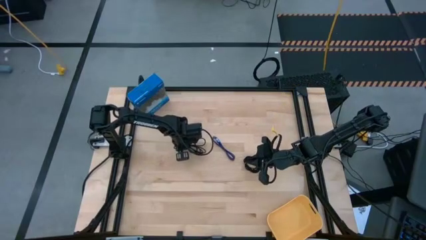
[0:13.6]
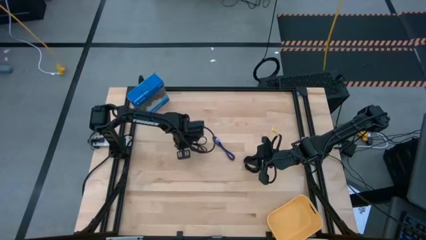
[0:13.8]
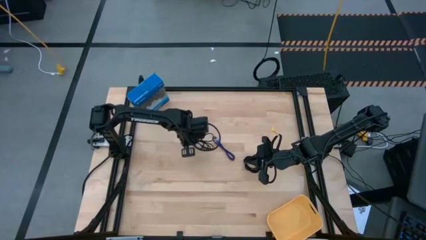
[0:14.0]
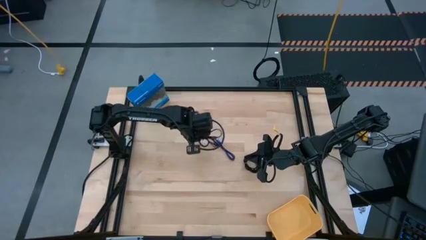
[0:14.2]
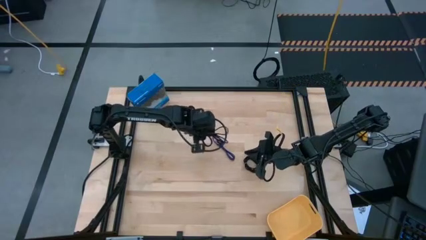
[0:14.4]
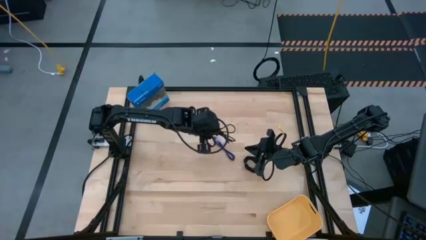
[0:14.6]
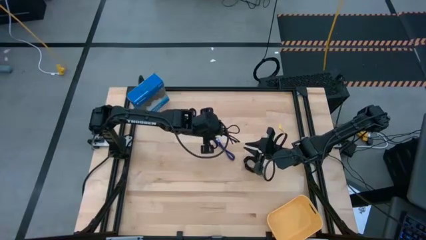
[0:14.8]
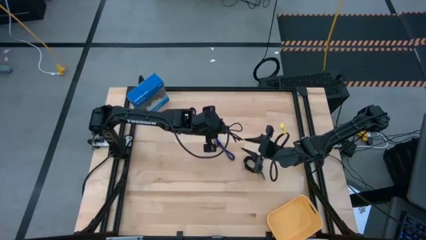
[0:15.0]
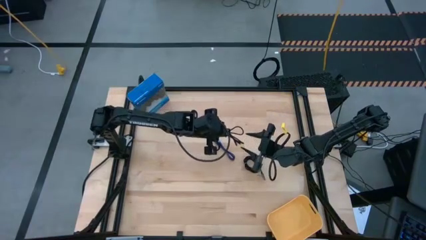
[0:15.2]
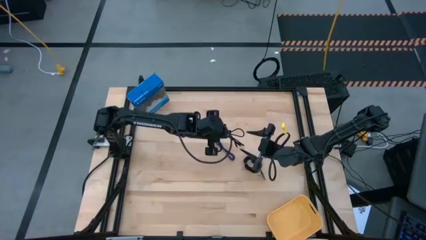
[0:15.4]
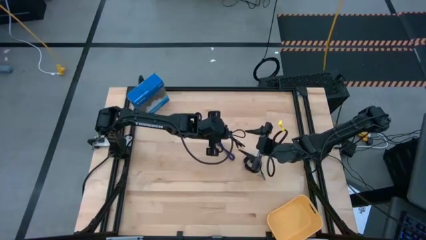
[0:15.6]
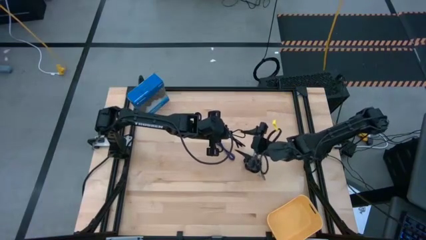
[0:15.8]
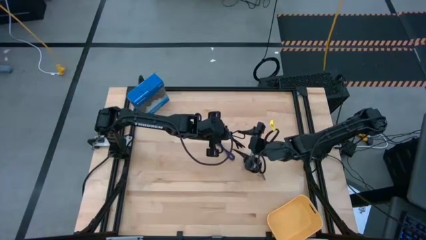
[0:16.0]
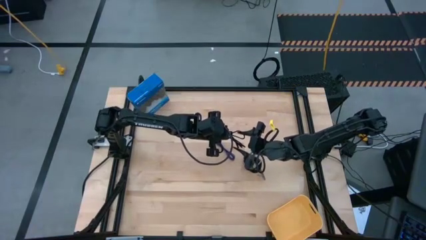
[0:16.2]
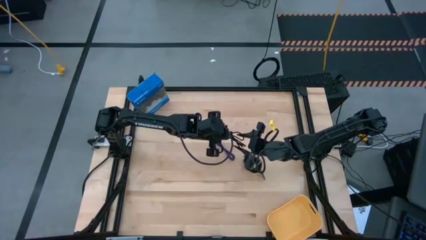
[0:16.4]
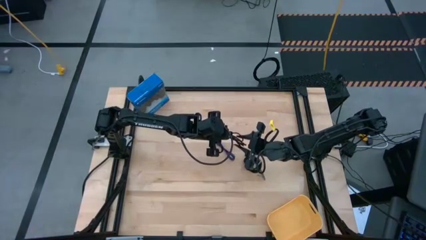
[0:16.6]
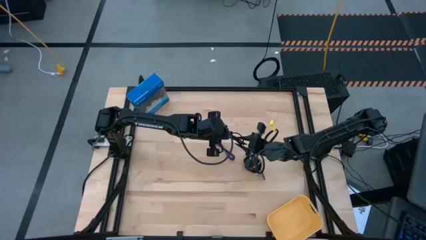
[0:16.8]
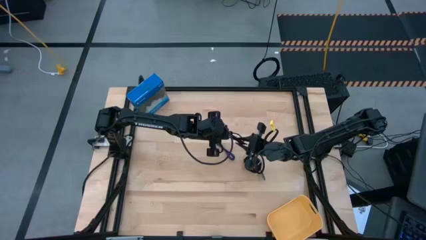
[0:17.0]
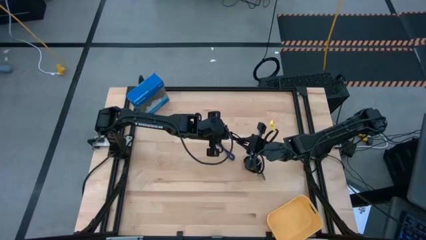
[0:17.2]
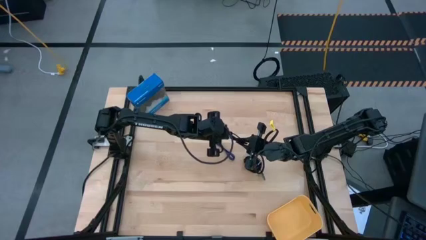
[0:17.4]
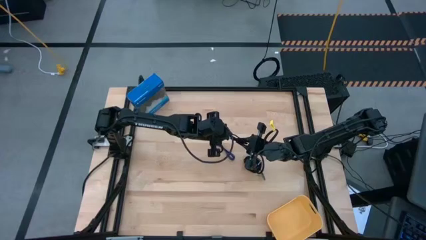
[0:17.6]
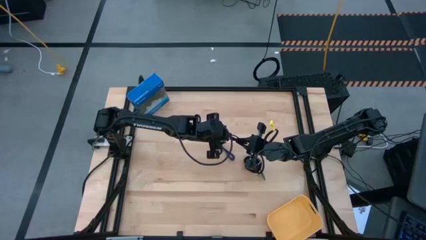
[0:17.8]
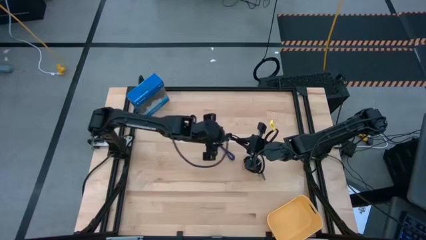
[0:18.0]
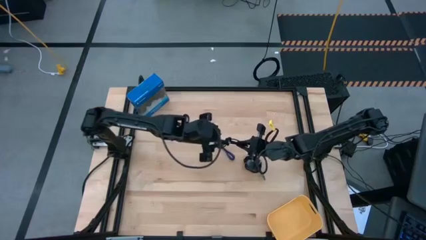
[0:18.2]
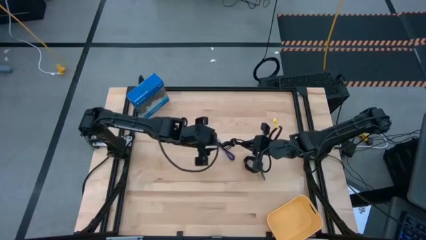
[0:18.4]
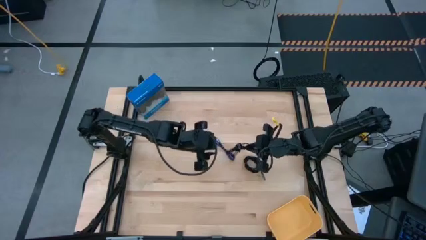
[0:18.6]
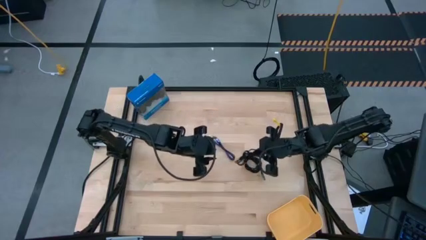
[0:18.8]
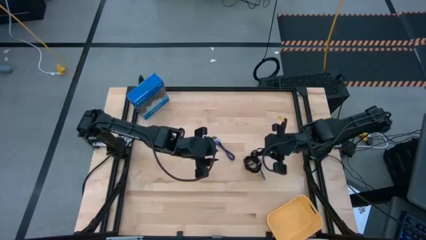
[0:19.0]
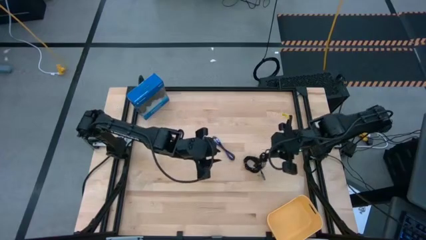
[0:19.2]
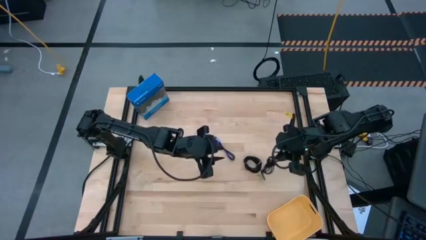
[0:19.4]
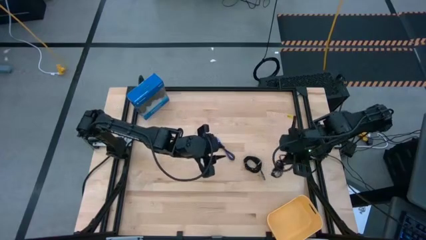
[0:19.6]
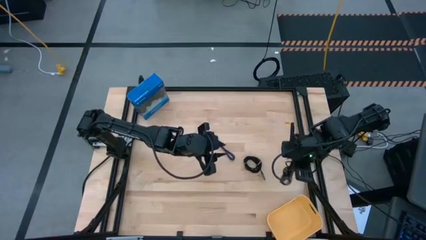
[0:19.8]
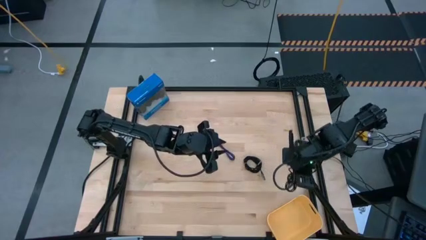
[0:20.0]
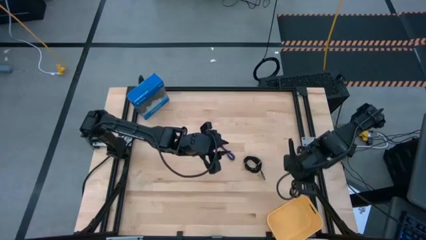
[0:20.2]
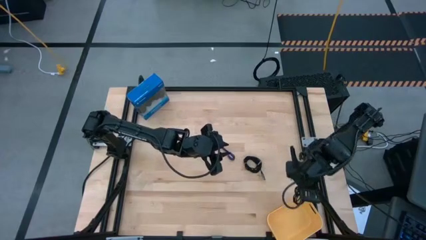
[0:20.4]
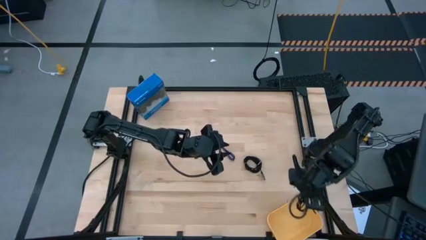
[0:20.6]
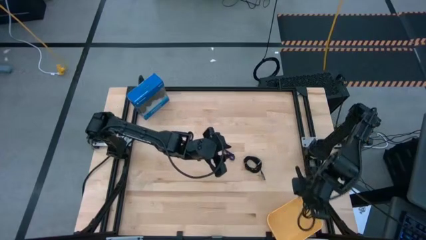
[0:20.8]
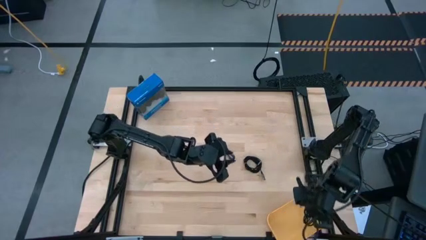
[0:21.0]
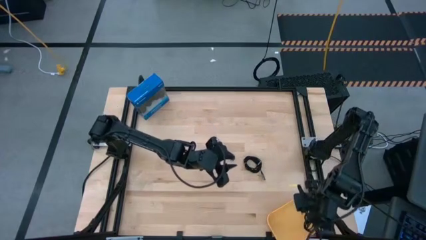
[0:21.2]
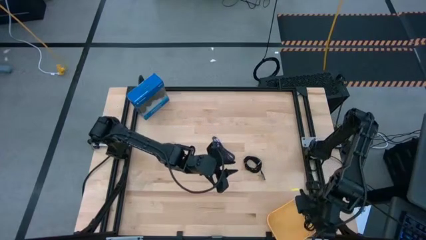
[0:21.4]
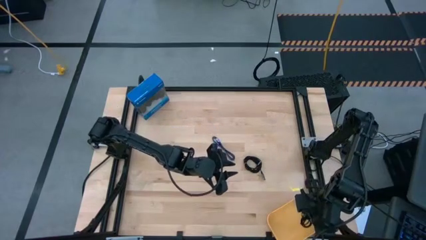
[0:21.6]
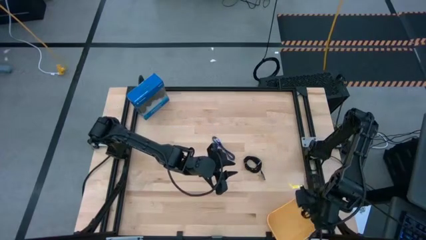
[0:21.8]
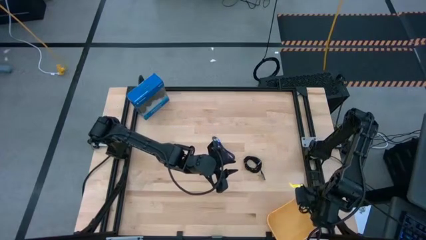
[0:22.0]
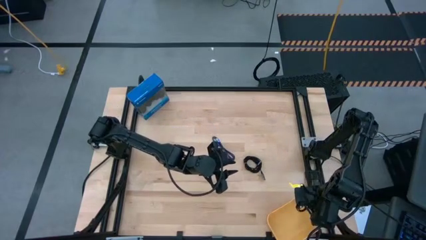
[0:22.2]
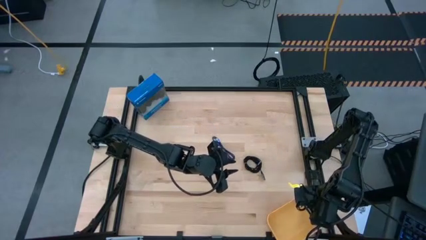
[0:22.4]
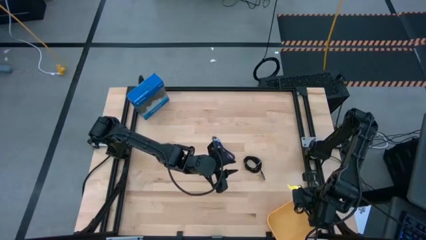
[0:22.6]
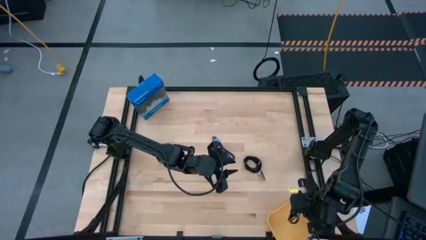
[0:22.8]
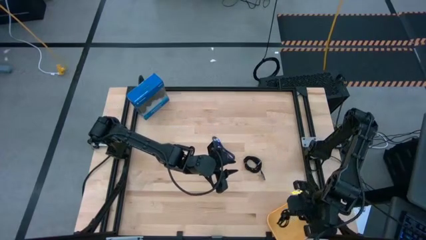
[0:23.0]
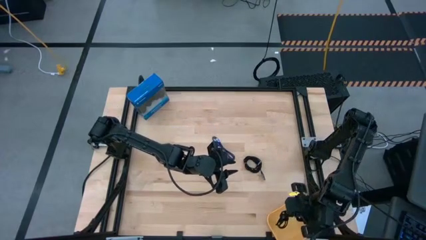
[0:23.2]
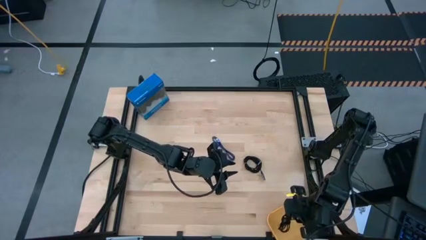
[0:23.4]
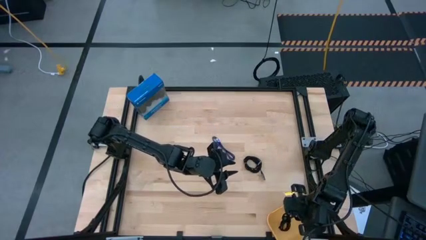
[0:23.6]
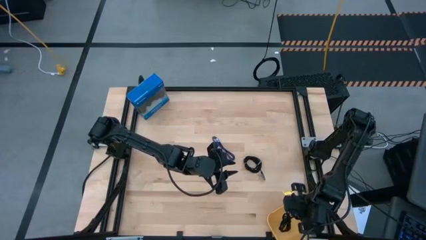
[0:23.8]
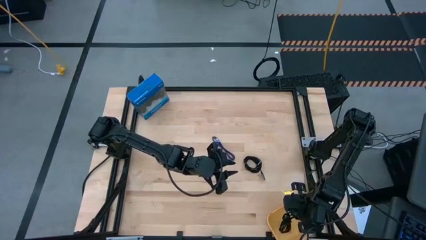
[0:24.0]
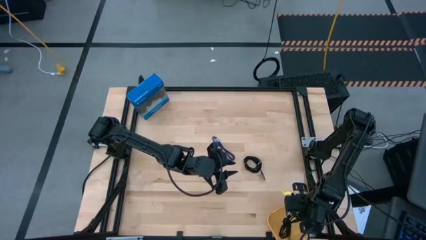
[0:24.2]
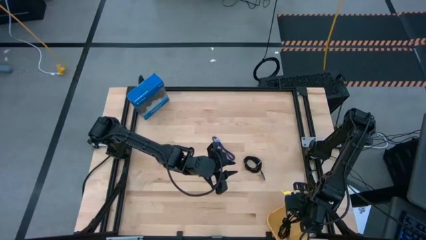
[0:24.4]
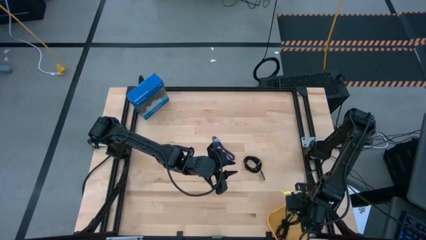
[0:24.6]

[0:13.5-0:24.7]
Task: Pick and place USB-C Cables
Put the left black charger cable into the yellow bin

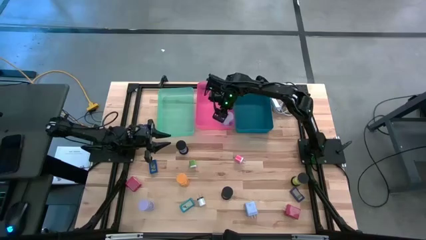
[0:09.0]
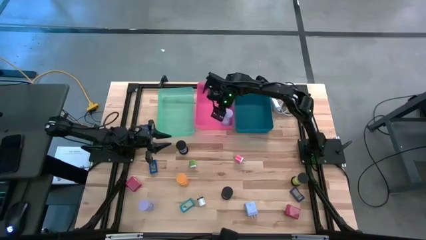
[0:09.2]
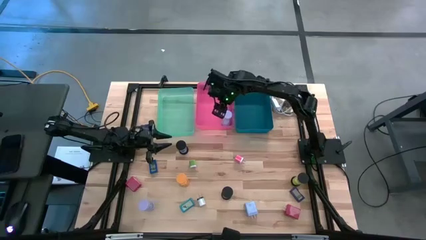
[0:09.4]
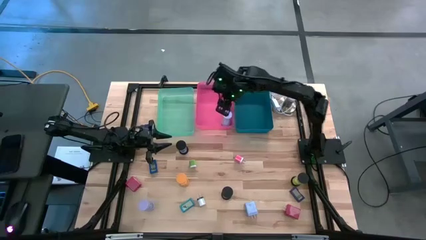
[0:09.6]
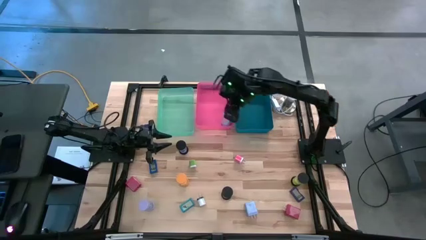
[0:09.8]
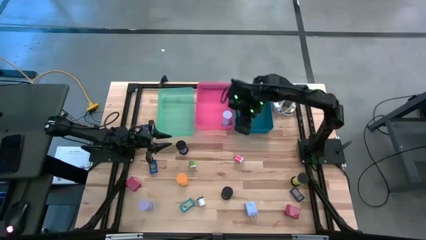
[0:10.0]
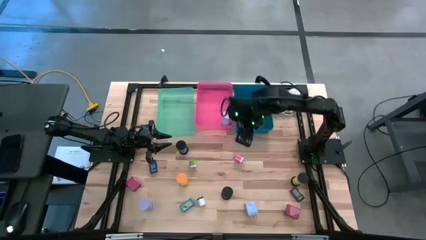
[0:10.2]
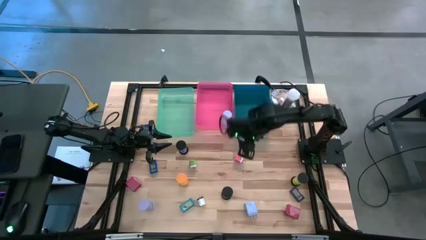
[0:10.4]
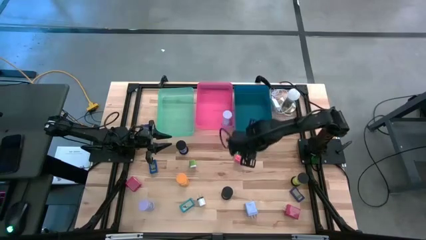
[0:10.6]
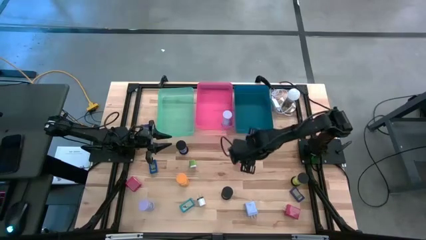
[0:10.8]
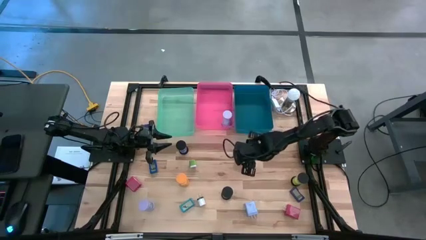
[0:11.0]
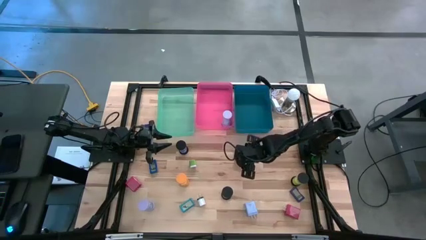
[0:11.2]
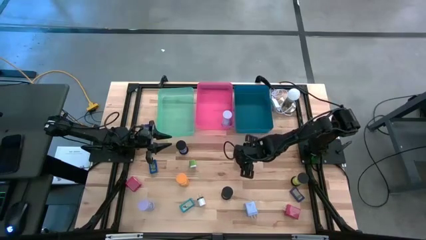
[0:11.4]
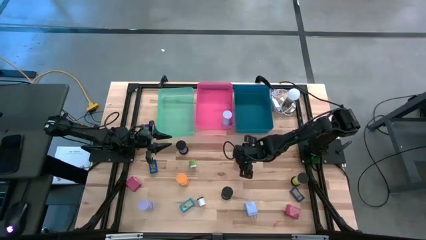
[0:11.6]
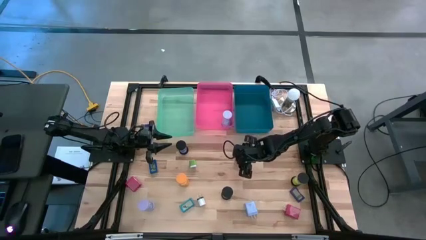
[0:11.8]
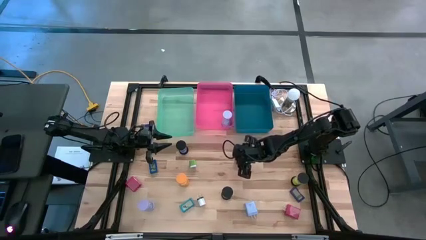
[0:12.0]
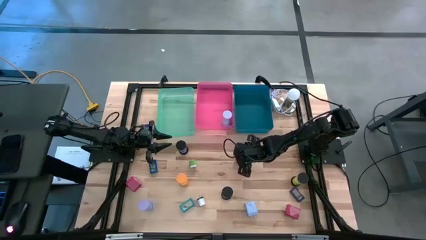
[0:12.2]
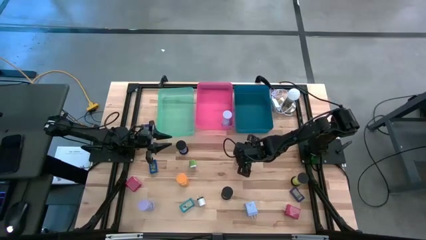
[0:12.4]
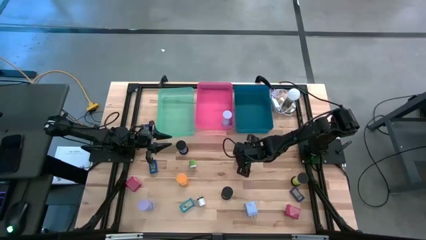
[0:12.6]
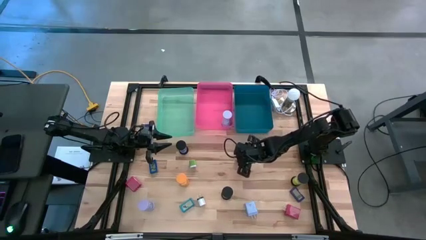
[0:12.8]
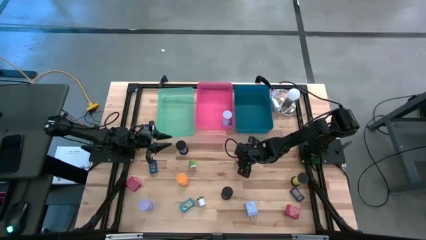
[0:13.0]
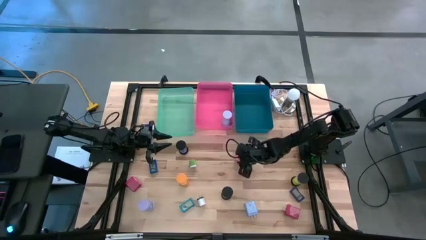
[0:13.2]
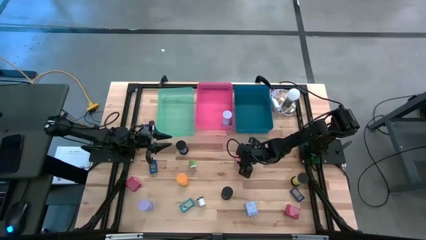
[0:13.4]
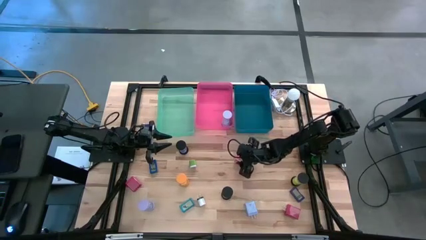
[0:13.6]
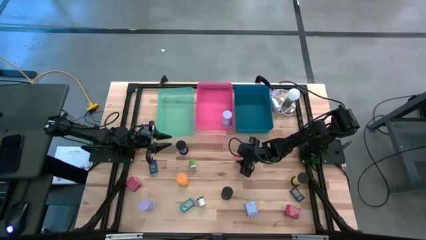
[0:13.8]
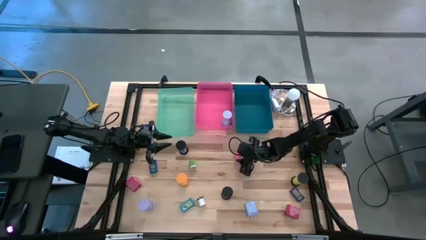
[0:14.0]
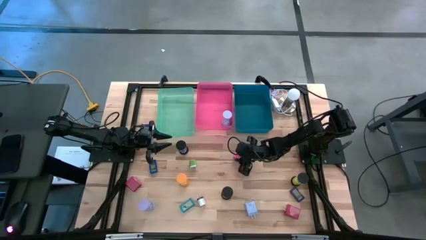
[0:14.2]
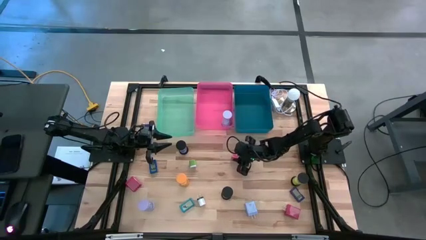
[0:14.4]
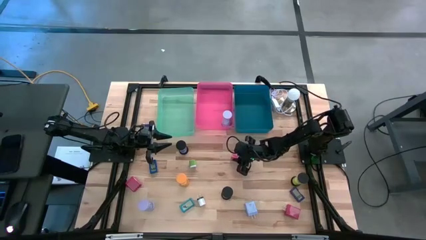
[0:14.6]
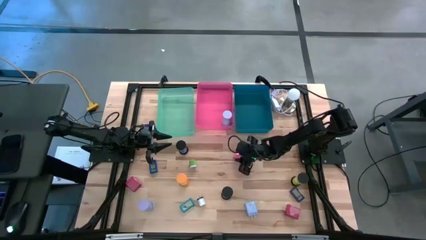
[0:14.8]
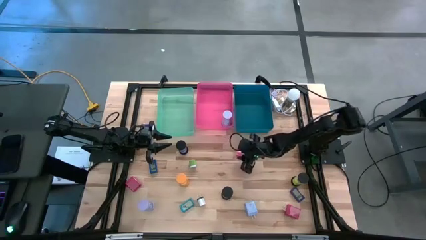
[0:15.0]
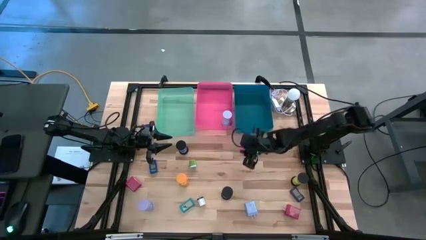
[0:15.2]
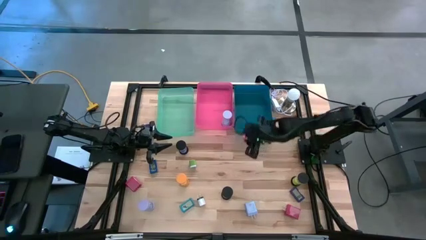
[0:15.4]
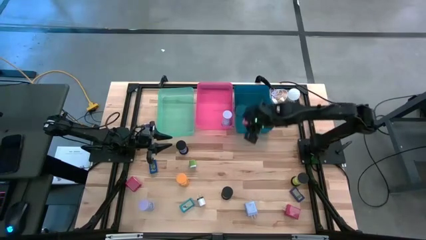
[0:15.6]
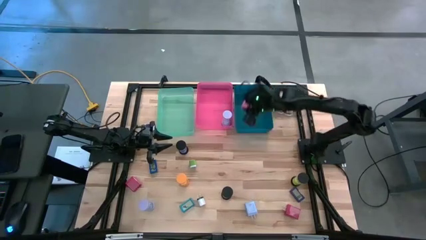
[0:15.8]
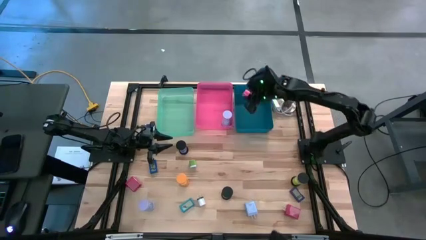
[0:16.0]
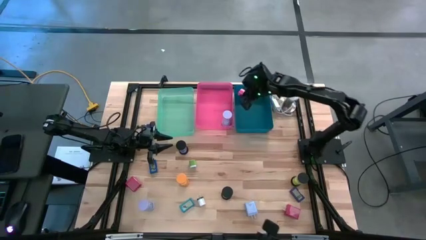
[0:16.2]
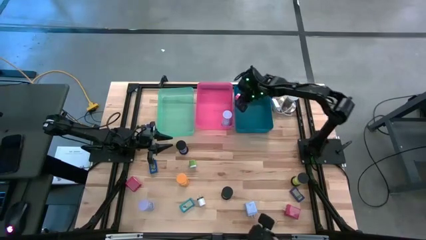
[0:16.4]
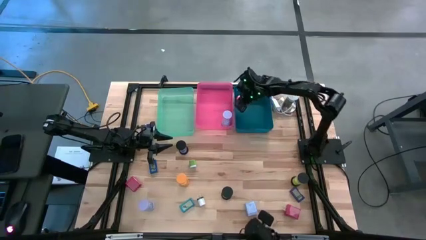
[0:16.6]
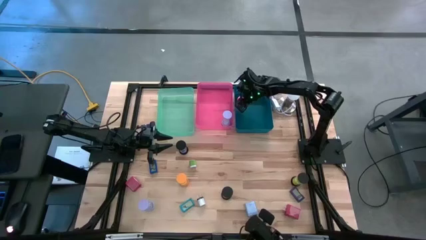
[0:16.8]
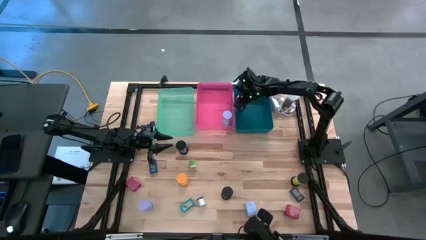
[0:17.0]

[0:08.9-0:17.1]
Task: Pick & Place Office items
Put the pink charger adapter into the blue bin
